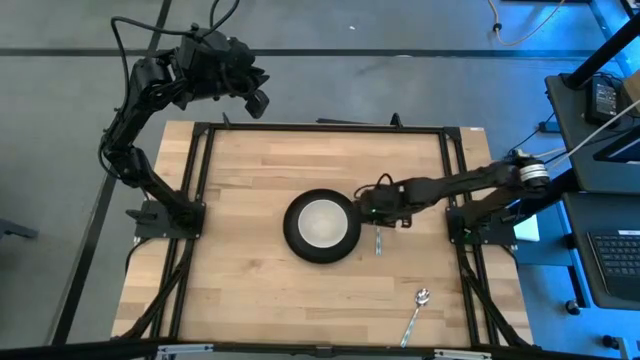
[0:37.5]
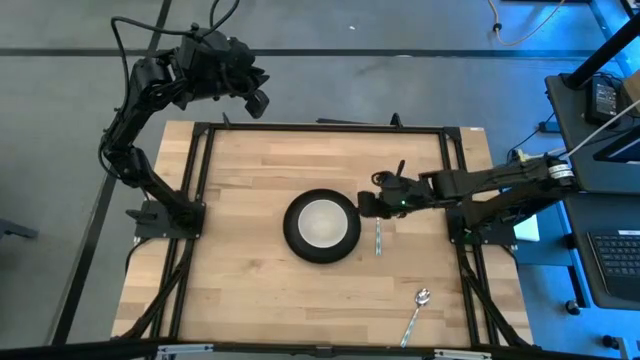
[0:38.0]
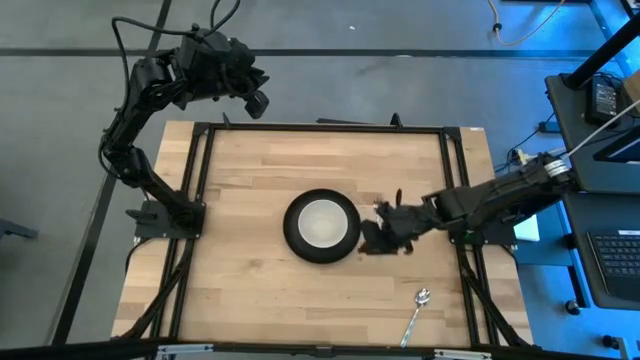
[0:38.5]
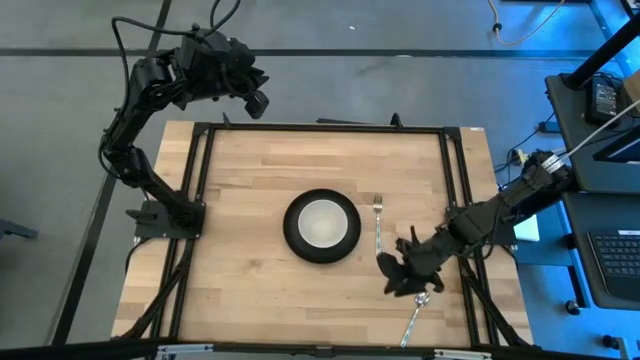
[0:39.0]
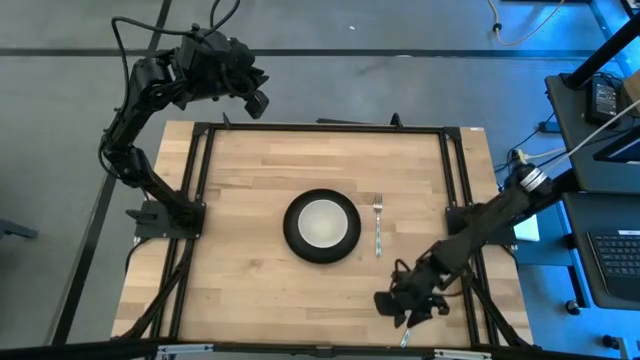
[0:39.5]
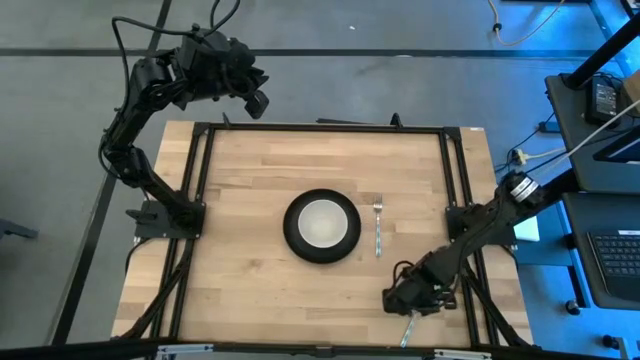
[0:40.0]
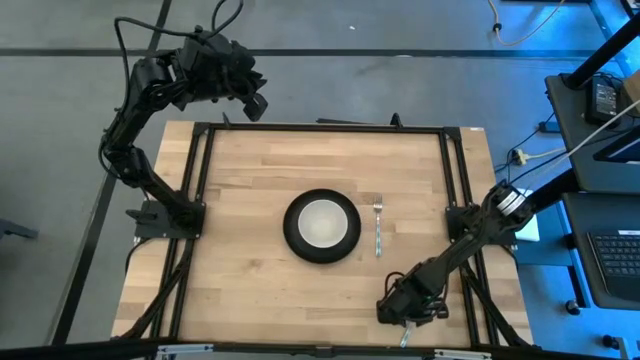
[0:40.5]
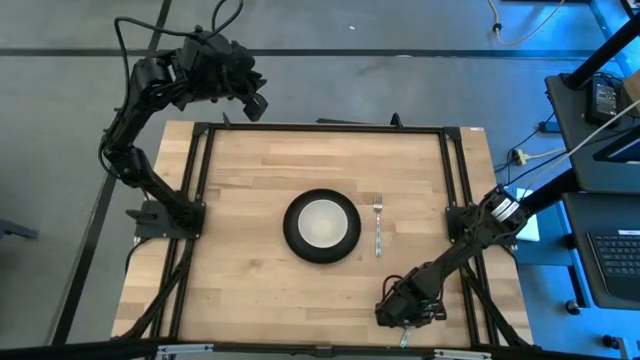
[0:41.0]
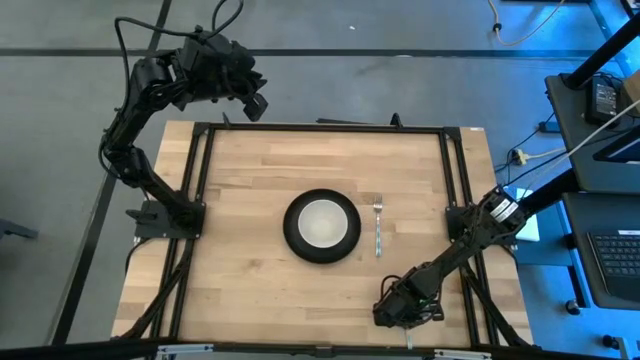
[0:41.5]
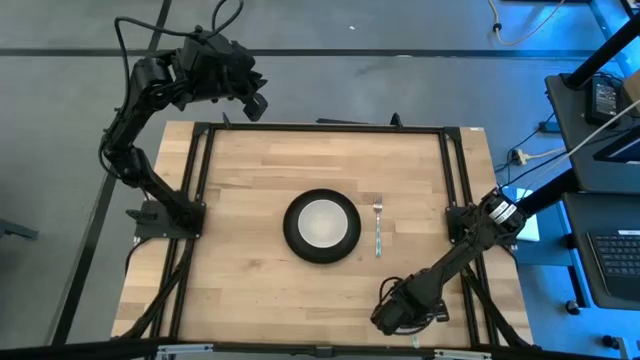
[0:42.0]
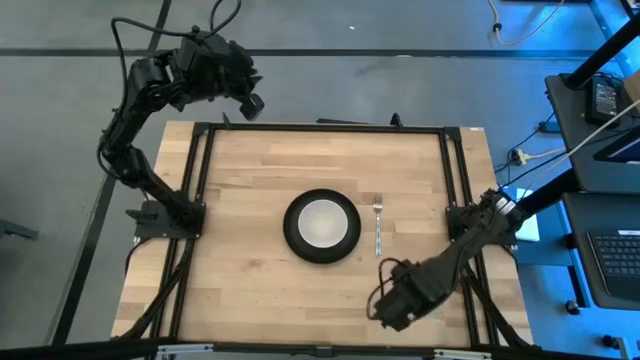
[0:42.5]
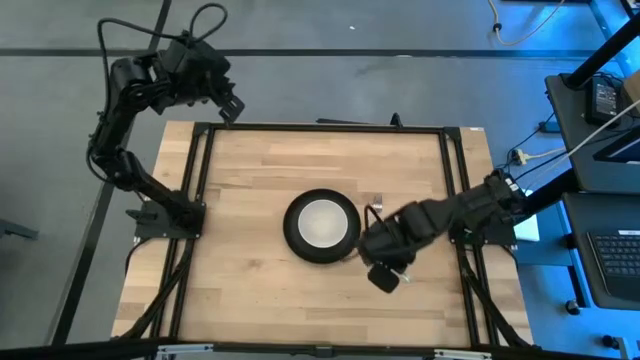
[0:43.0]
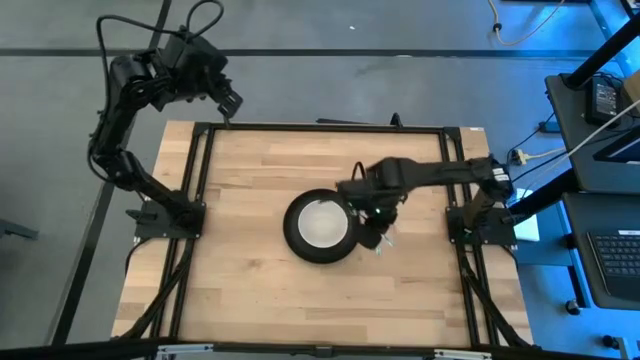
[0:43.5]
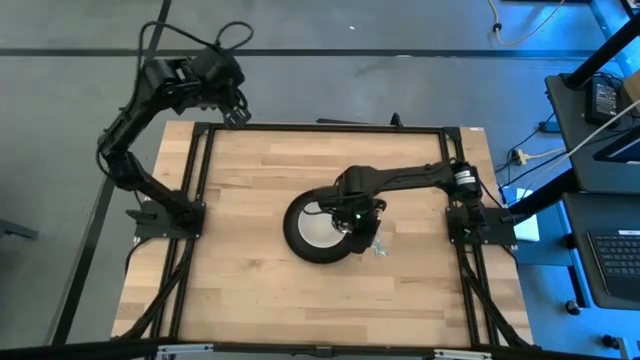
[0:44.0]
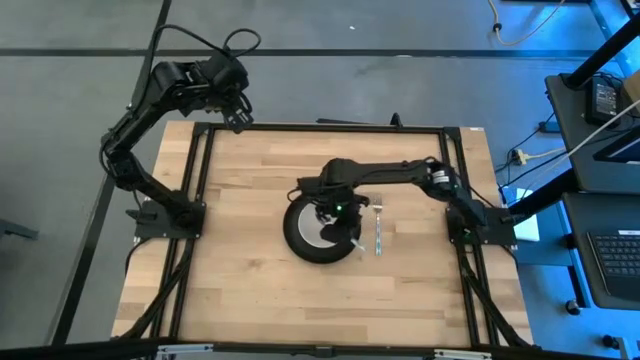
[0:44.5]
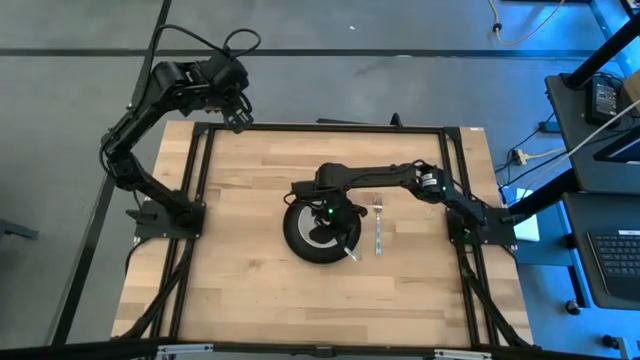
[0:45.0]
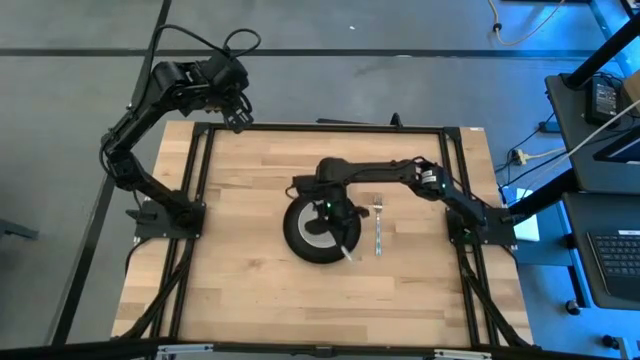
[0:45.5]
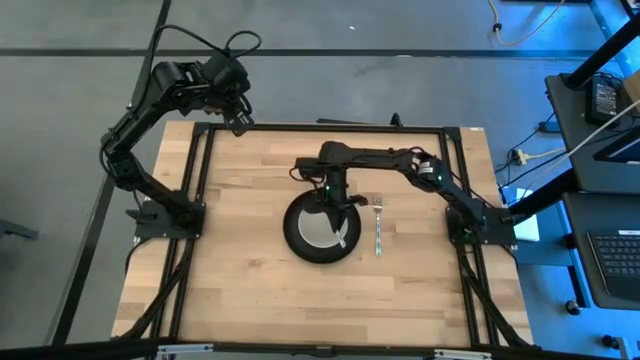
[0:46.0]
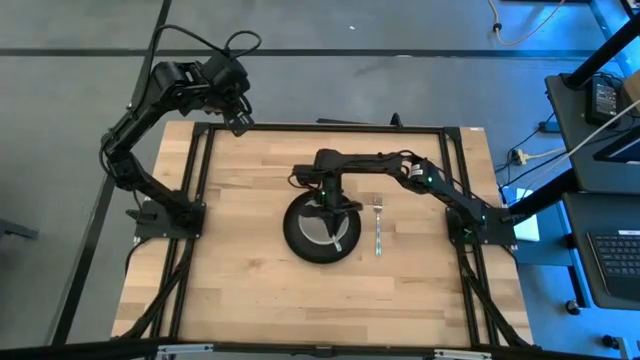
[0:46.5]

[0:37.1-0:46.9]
Task: Set table place
Put the blue patterned spoon into the white bowl

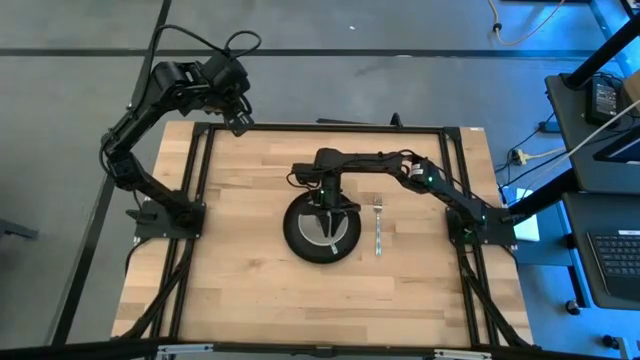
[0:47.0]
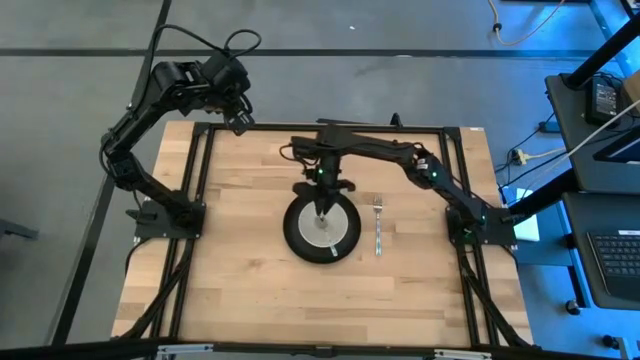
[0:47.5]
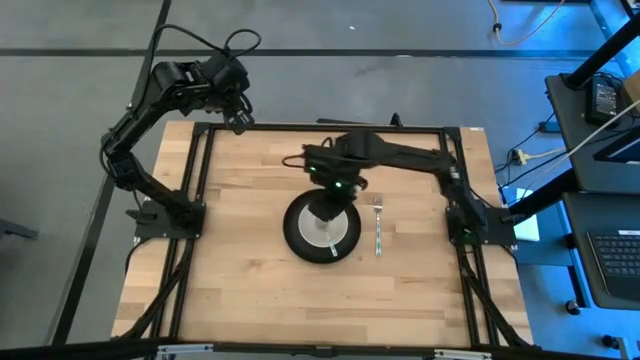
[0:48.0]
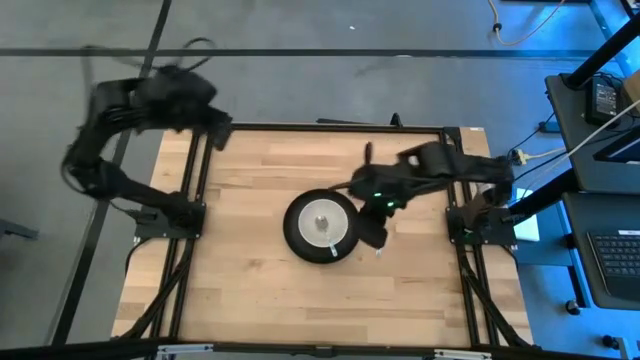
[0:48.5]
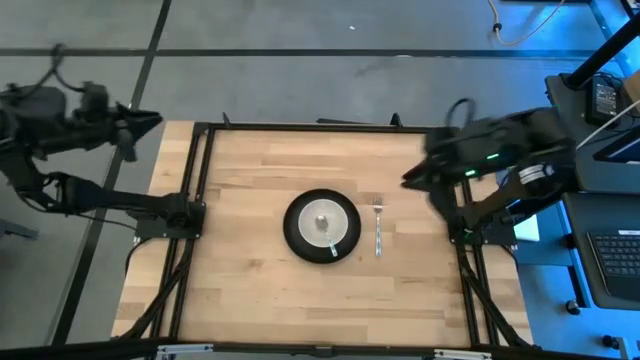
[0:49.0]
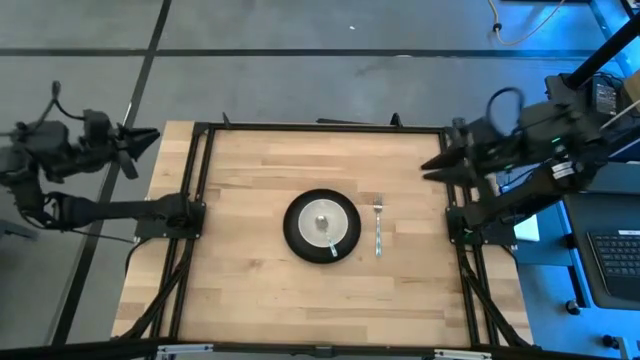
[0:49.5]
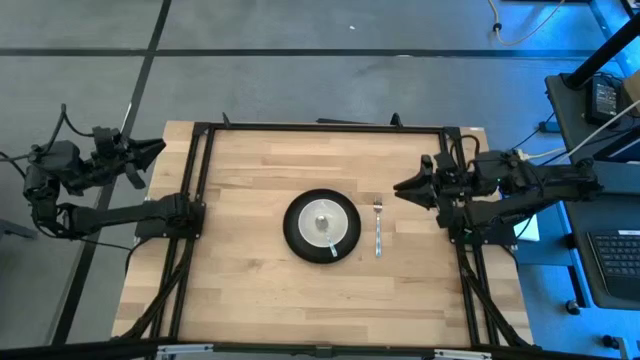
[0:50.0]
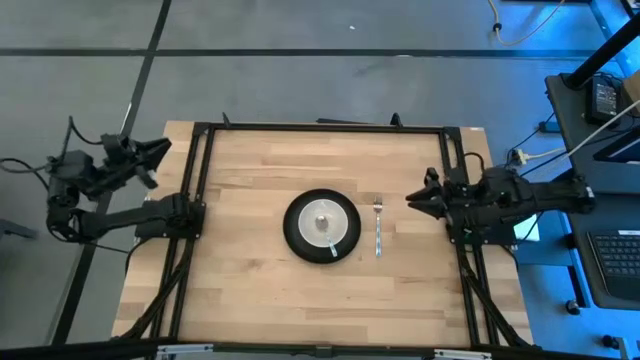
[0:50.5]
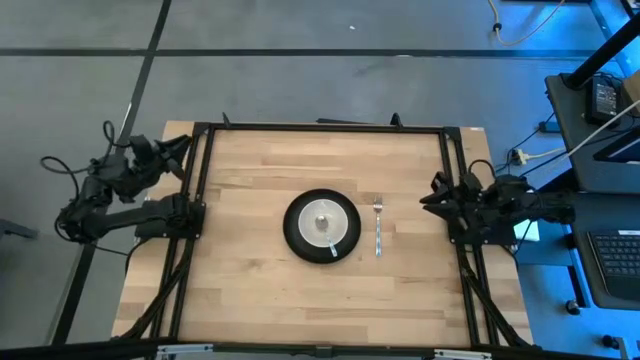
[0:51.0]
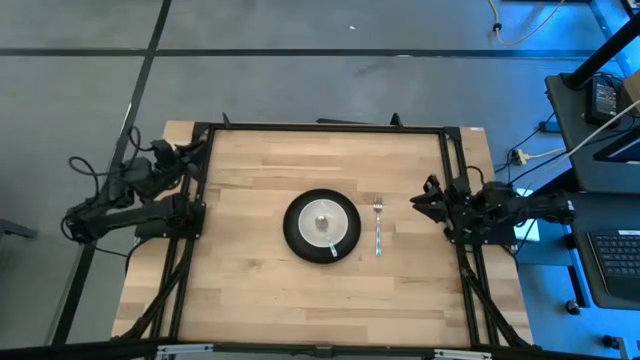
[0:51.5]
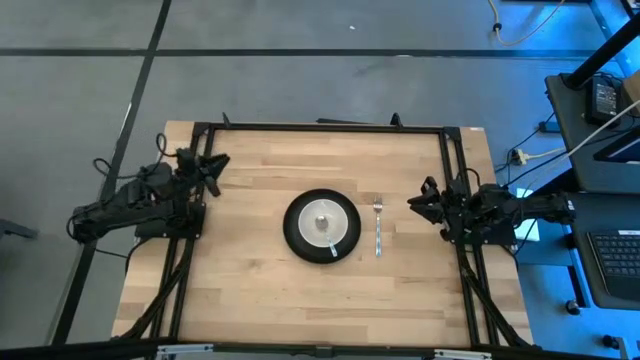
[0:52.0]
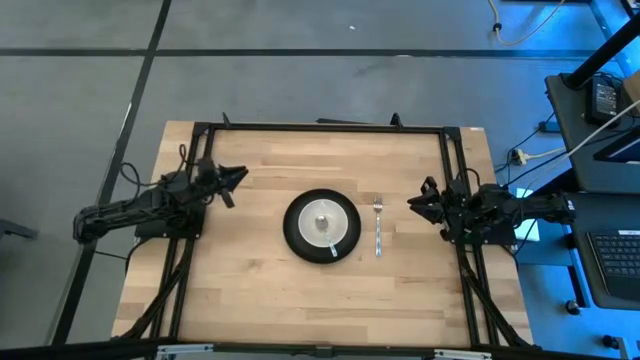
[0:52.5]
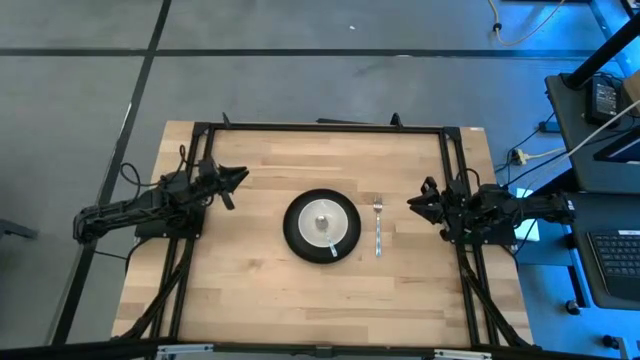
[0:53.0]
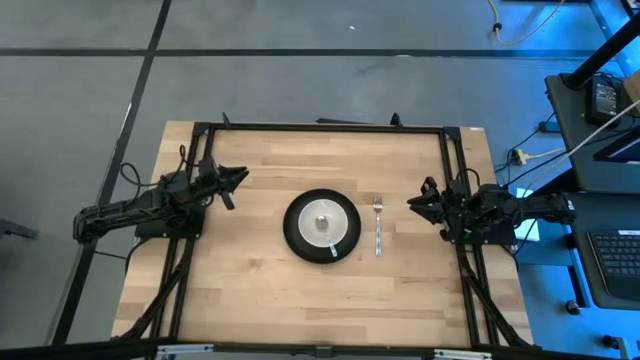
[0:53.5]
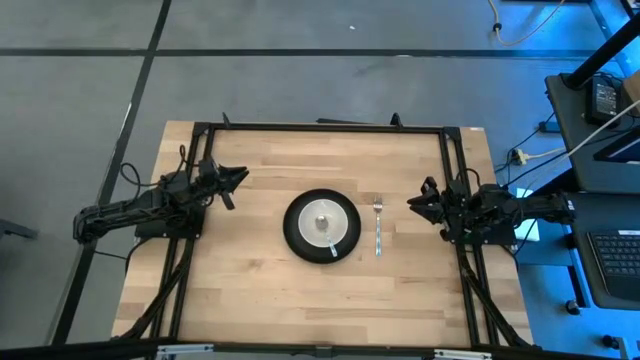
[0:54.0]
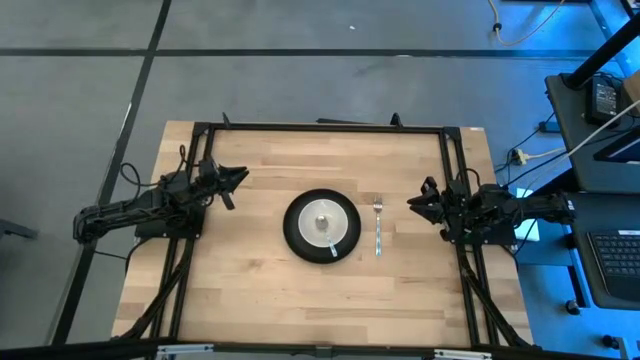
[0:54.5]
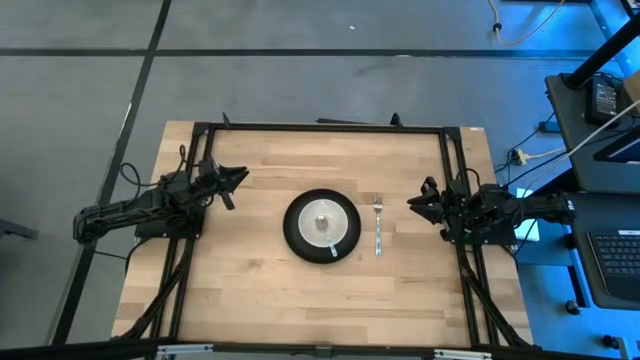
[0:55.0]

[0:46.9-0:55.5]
Return to Home Position

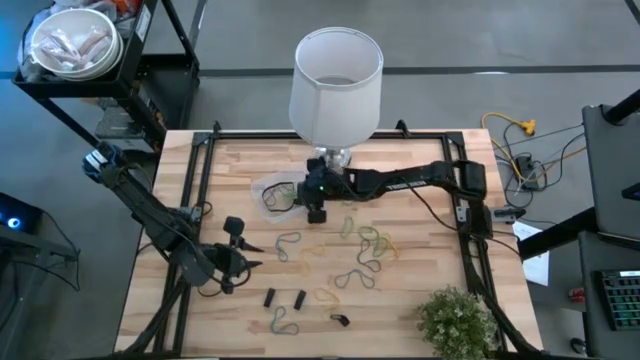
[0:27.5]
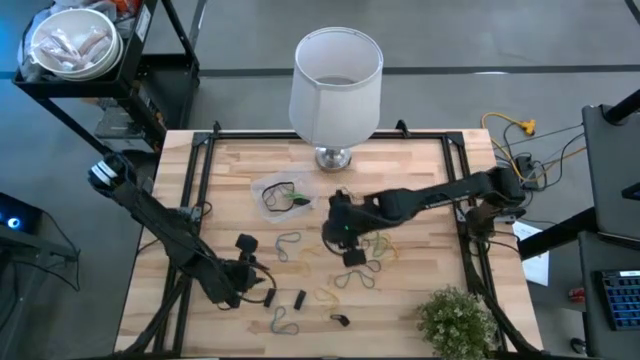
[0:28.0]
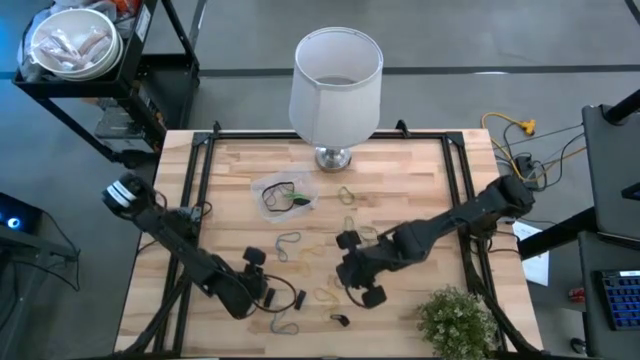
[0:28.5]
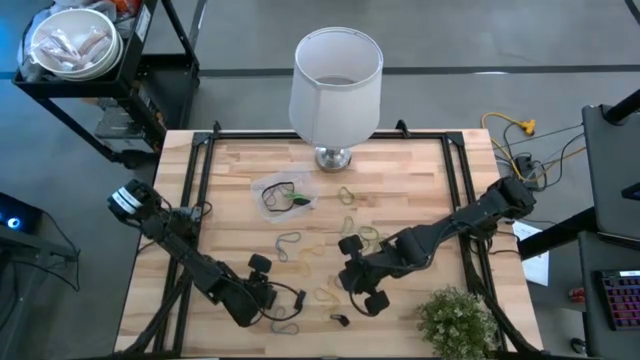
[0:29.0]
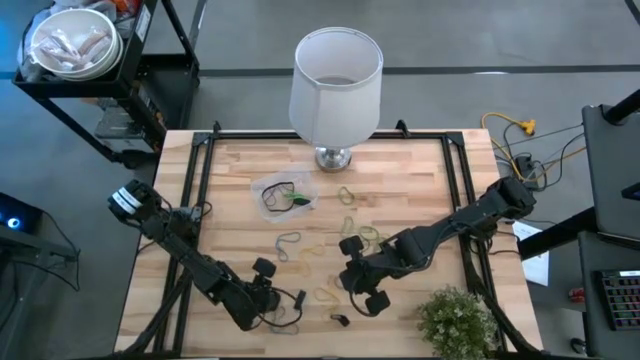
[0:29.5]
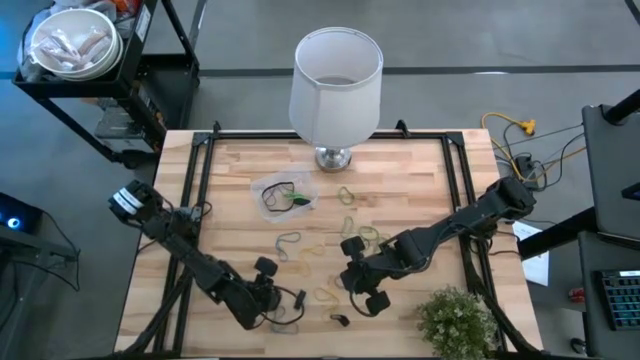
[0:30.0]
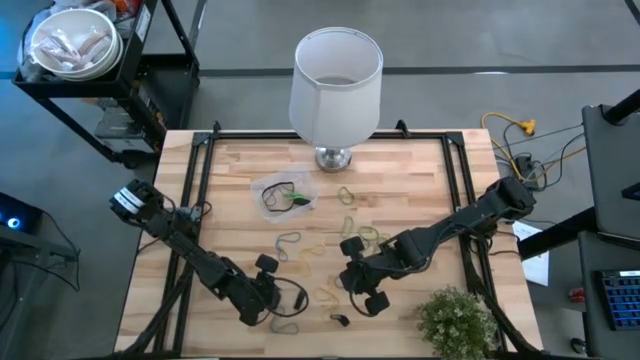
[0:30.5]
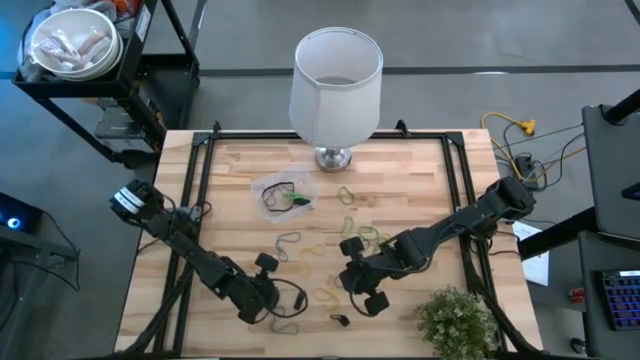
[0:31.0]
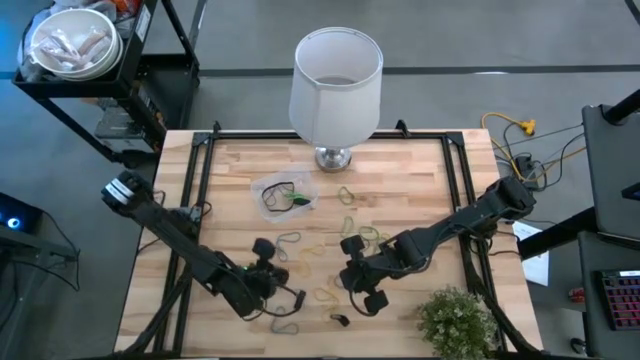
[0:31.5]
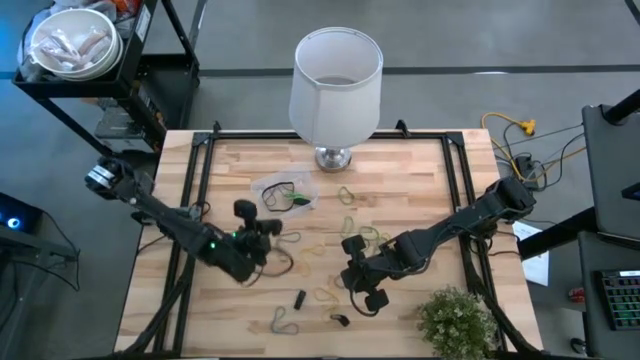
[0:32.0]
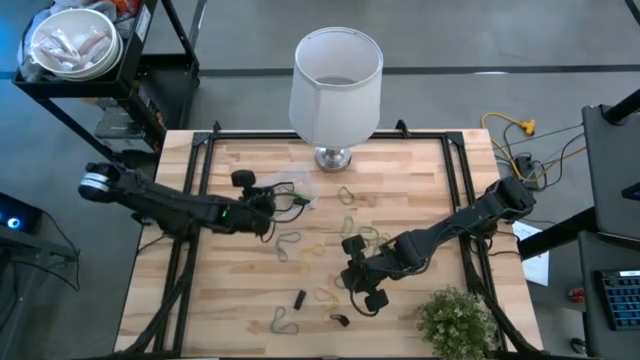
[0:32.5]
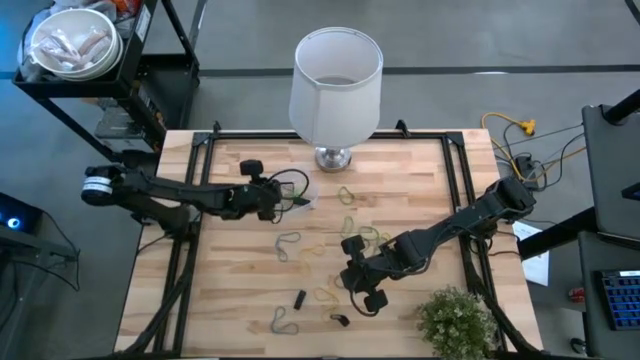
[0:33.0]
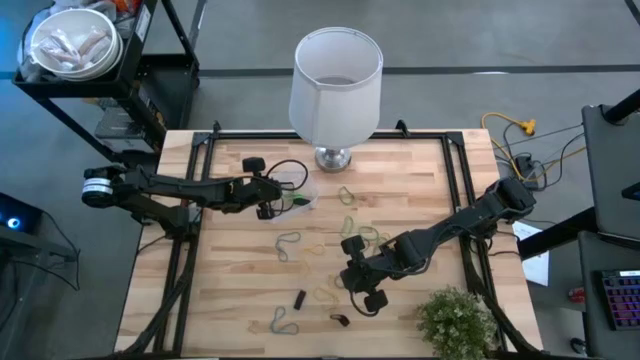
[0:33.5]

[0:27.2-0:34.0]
Task: Pick and place rubber bands into bin
Put the black rubber band into the transparent bin
